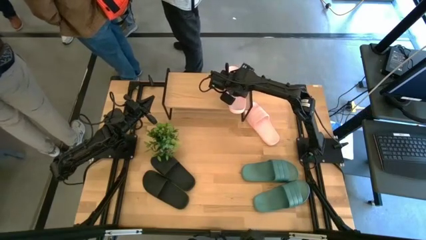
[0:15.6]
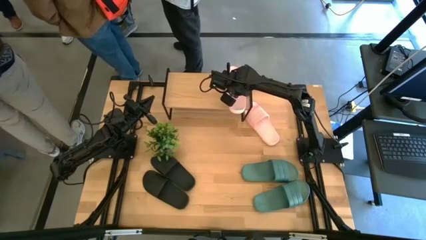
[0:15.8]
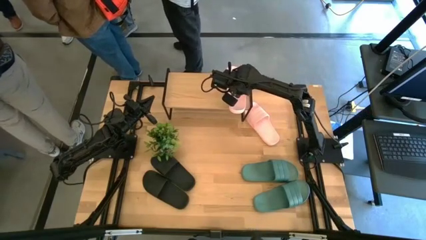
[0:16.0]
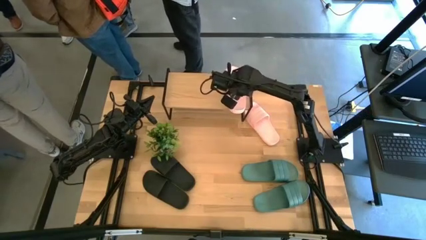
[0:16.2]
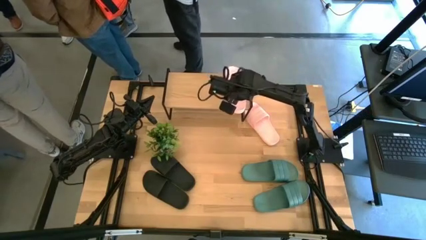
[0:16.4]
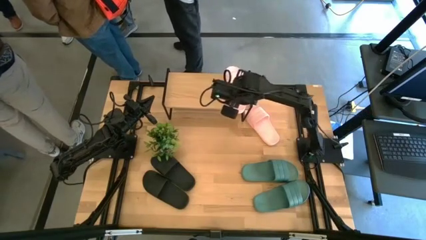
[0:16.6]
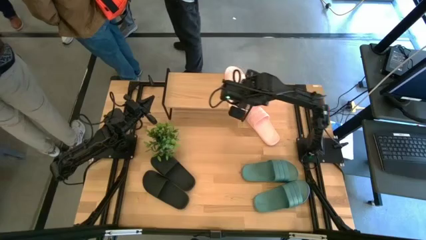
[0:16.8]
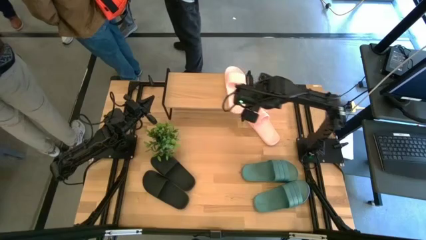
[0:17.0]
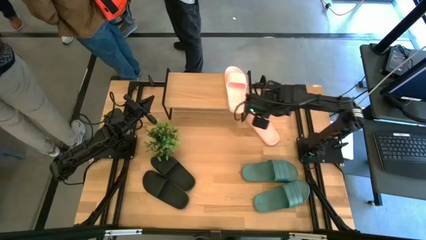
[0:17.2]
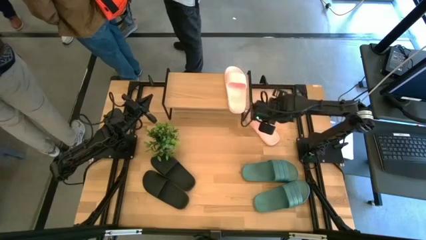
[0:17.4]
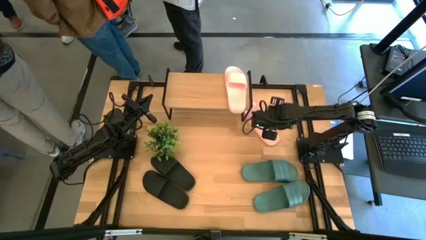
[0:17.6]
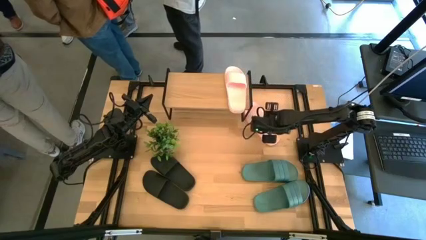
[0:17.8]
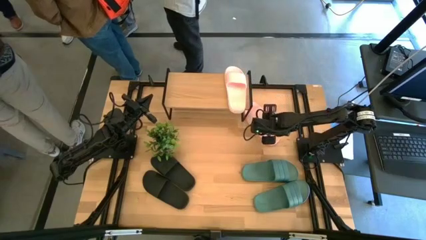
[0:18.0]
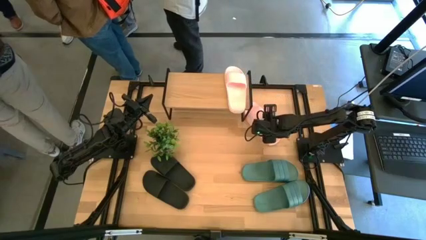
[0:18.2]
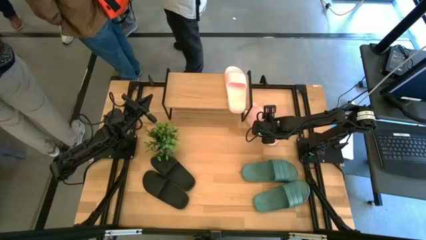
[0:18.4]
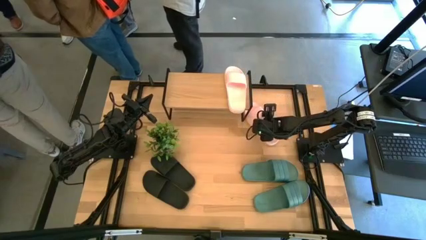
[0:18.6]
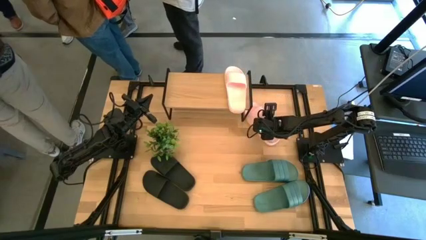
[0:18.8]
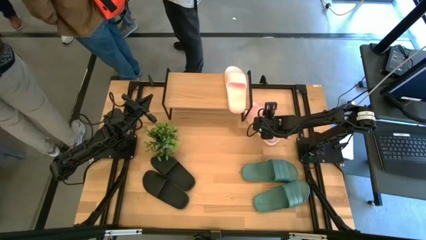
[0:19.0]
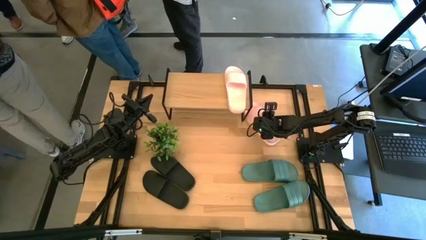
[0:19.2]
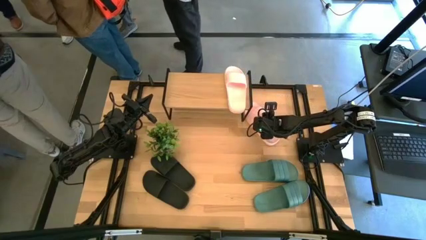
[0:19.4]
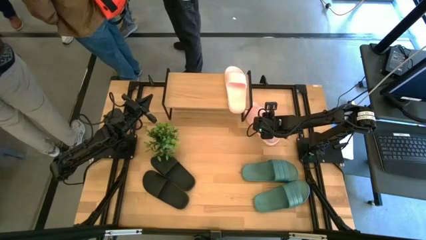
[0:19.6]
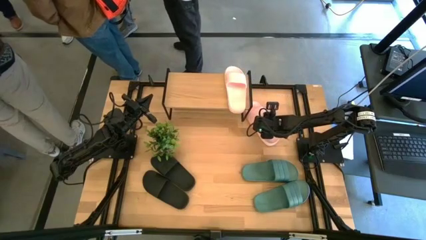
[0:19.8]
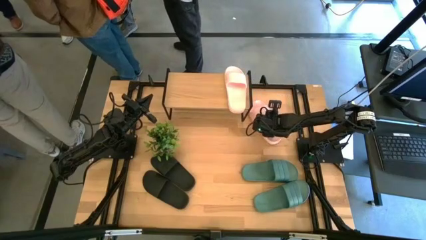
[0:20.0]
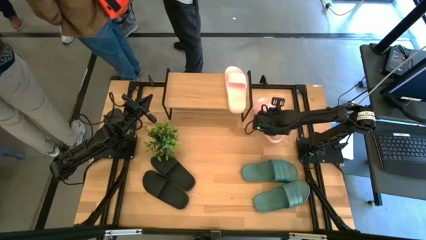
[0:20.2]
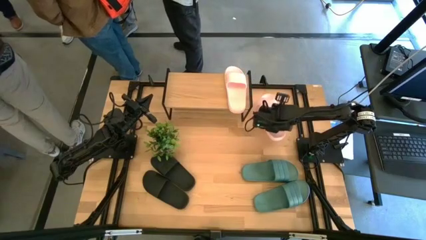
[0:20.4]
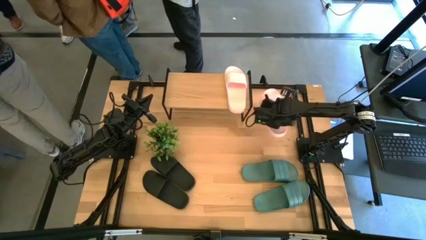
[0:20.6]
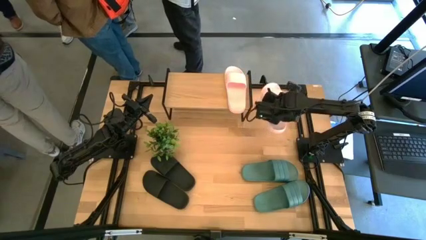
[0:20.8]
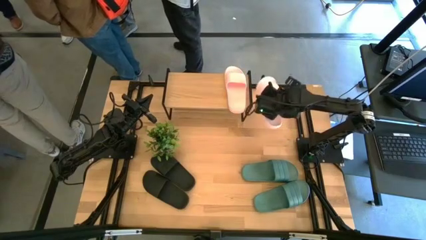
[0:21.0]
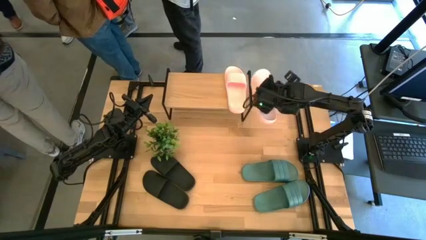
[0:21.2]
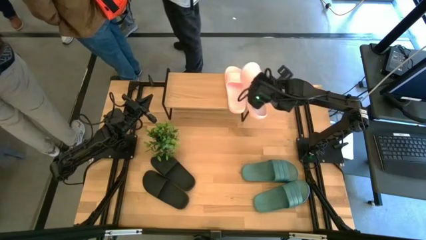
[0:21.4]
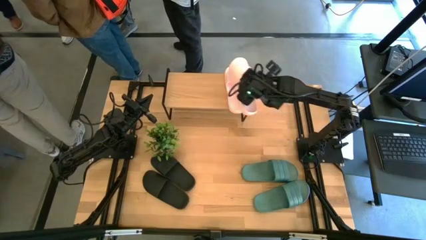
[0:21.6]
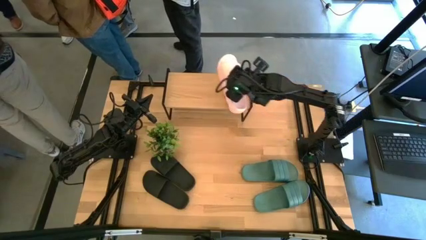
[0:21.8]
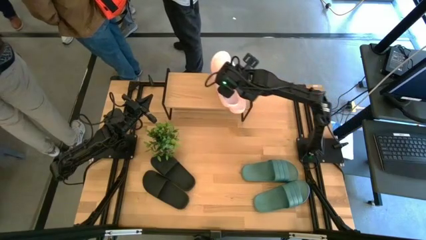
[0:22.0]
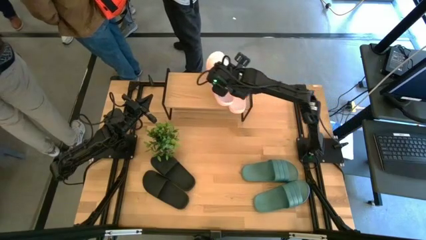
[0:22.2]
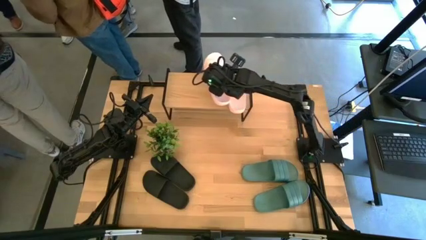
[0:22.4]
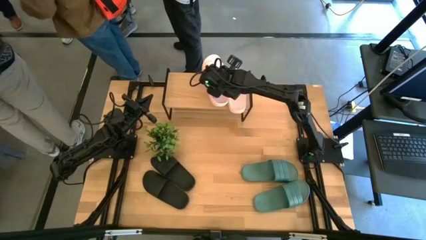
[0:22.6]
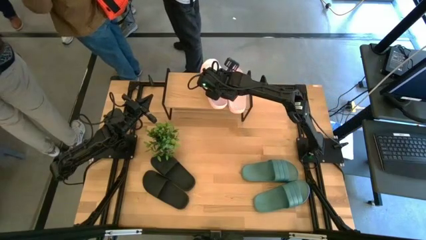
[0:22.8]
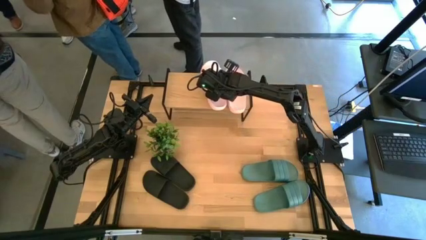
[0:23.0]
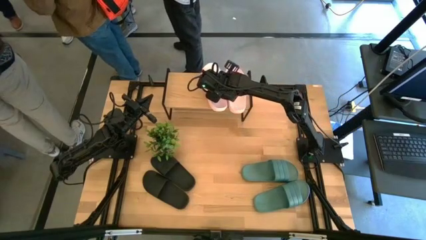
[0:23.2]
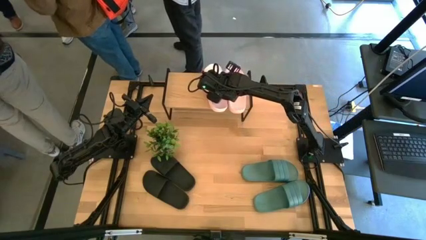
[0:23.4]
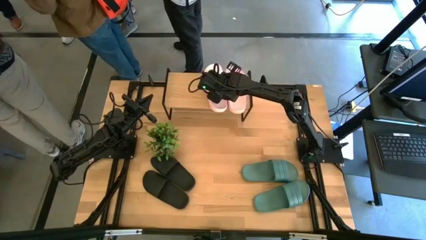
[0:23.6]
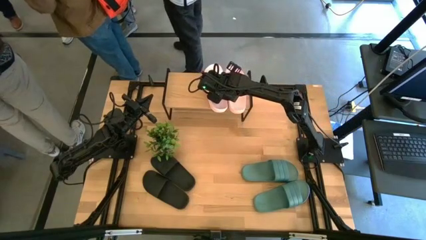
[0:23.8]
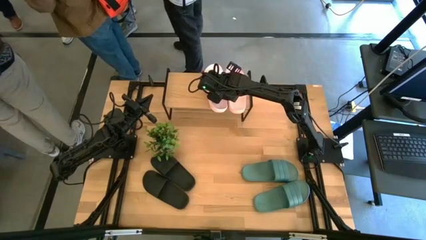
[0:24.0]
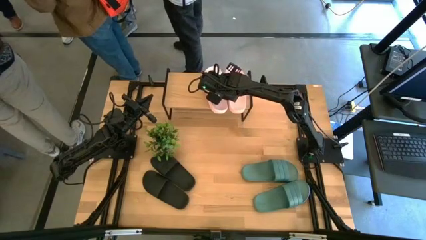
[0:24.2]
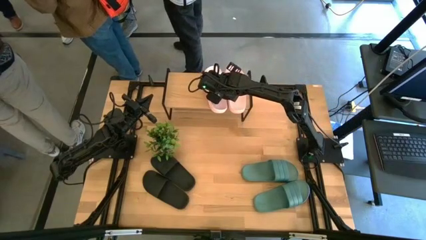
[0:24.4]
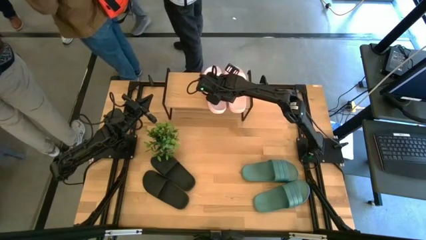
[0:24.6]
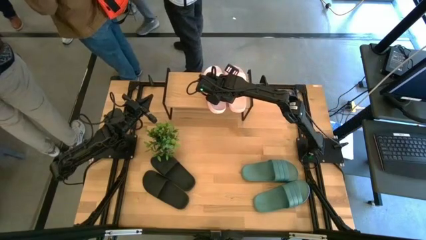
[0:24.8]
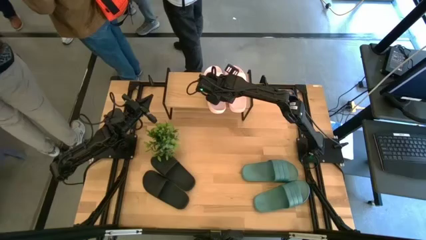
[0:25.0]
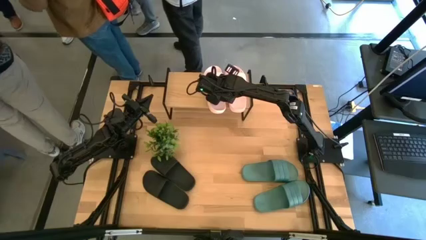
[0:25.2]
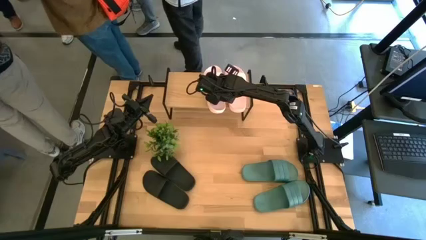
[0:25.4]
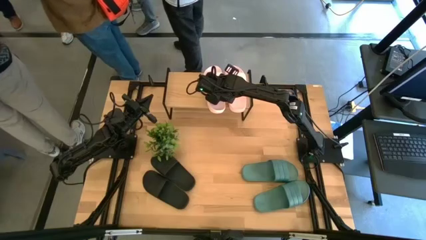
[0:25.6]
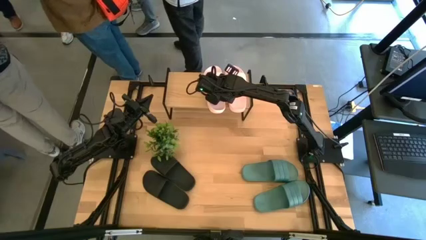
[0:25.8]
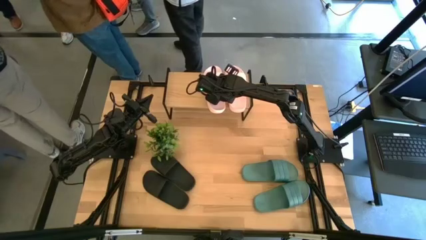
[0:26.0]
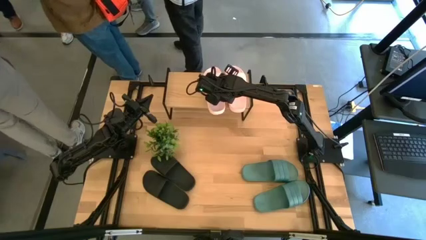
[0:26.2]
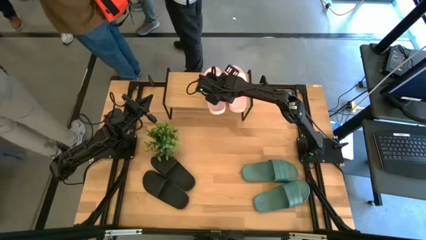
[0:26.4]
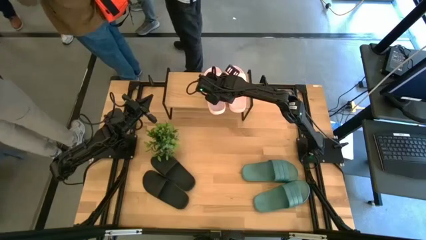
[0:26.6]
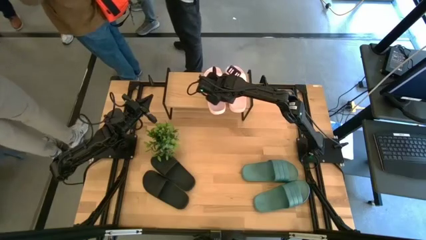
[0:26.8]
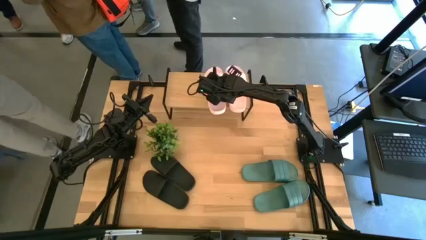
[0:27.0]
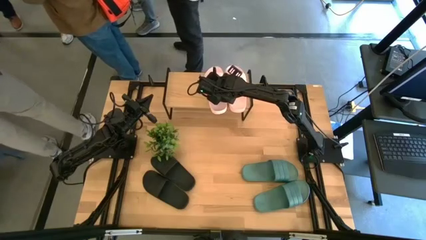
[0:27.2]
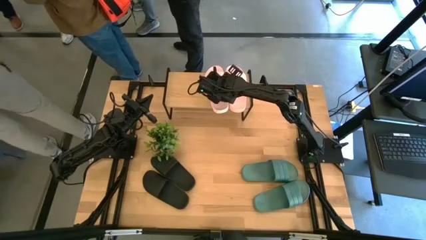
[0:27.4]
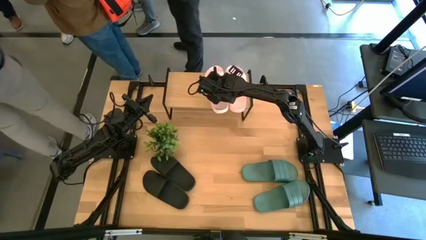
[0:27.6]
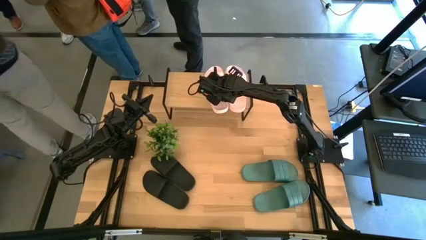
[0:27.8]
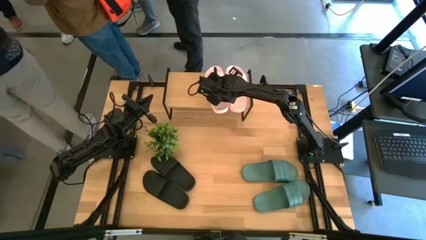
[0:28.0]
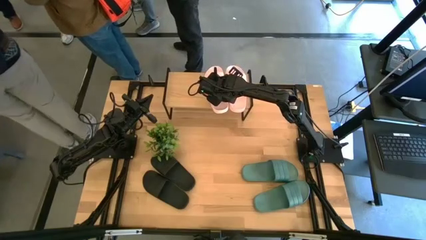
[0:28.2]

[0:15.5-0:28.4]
Task: Pick and place slides into the shelf
Put the pink slide on the shelf
